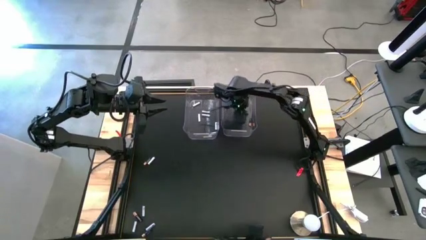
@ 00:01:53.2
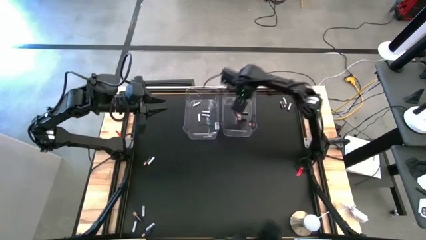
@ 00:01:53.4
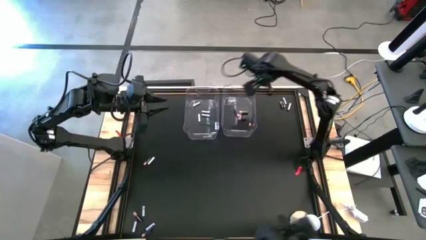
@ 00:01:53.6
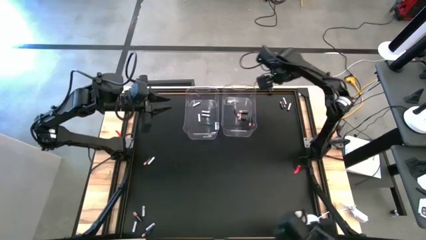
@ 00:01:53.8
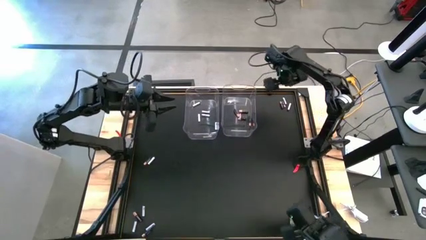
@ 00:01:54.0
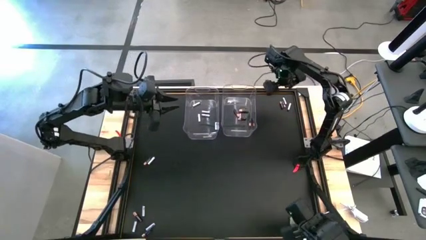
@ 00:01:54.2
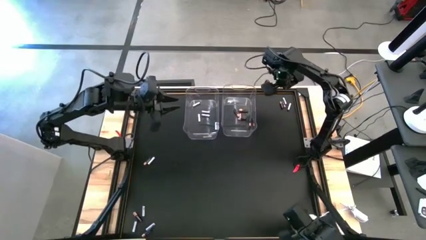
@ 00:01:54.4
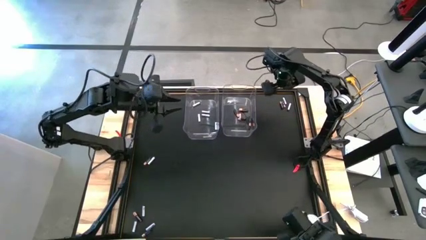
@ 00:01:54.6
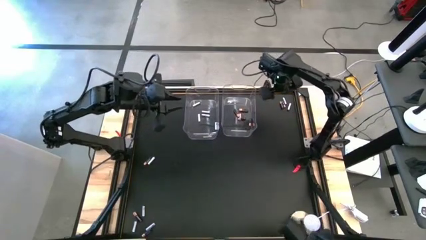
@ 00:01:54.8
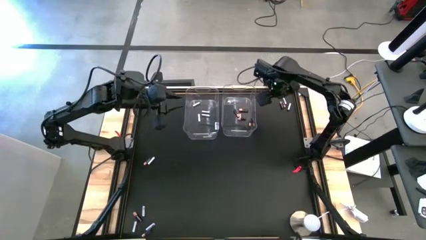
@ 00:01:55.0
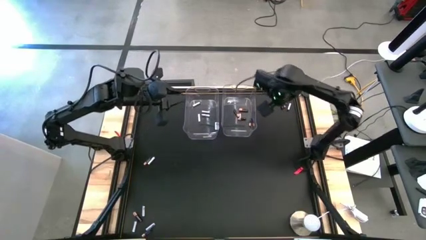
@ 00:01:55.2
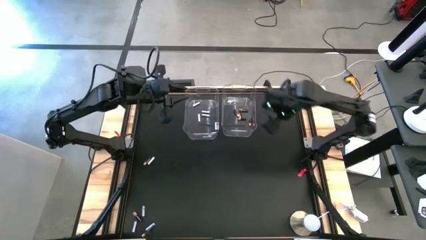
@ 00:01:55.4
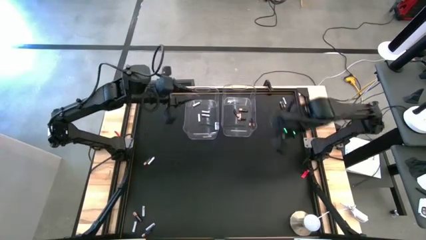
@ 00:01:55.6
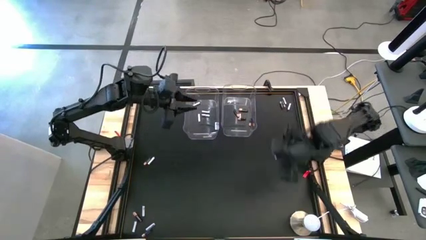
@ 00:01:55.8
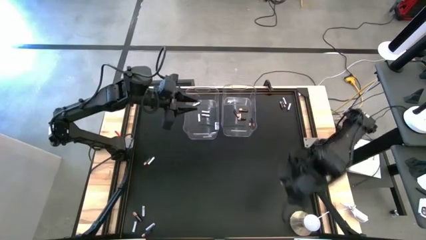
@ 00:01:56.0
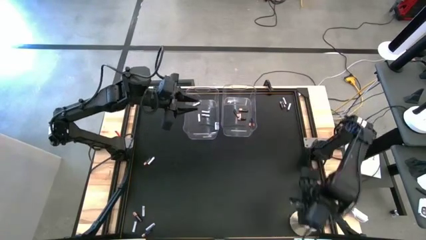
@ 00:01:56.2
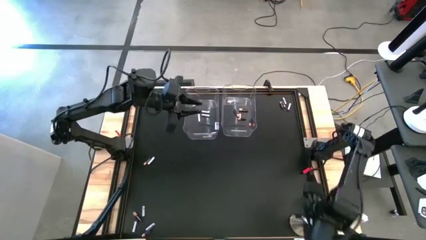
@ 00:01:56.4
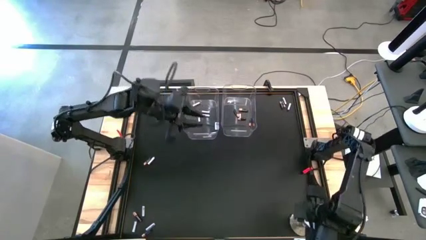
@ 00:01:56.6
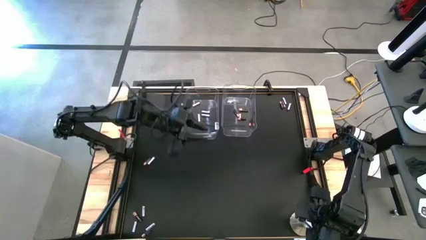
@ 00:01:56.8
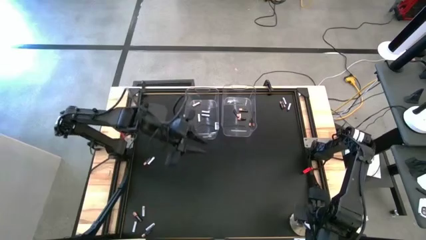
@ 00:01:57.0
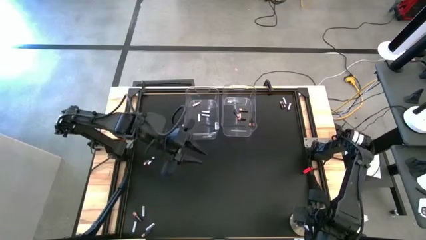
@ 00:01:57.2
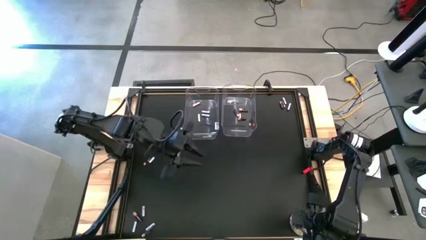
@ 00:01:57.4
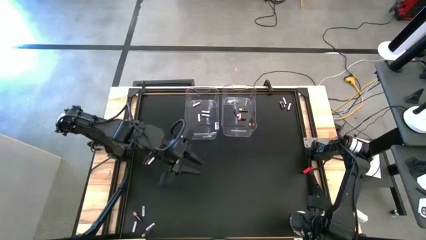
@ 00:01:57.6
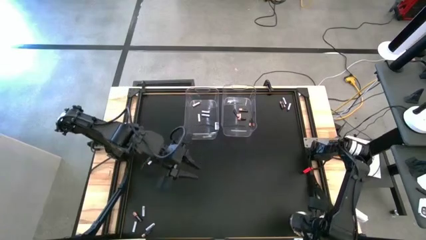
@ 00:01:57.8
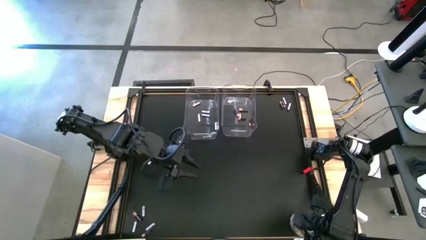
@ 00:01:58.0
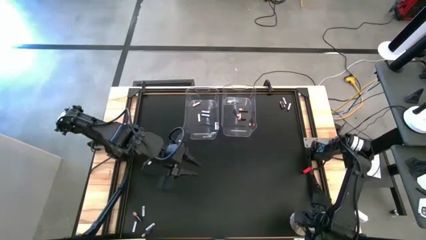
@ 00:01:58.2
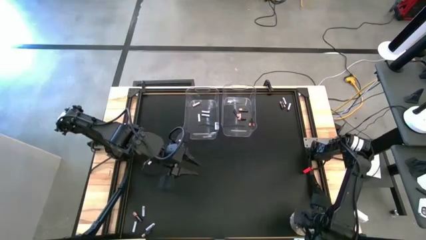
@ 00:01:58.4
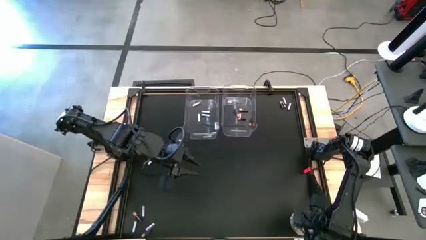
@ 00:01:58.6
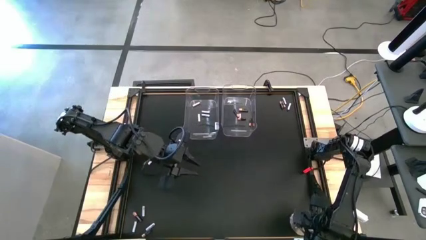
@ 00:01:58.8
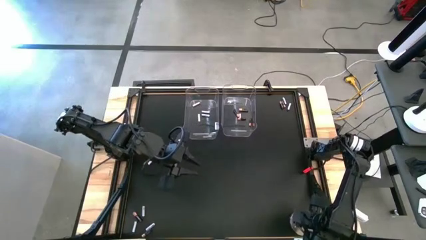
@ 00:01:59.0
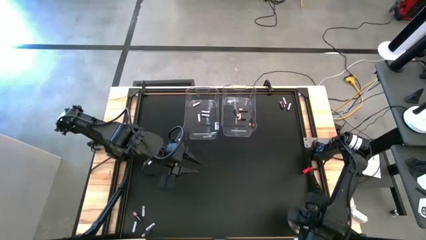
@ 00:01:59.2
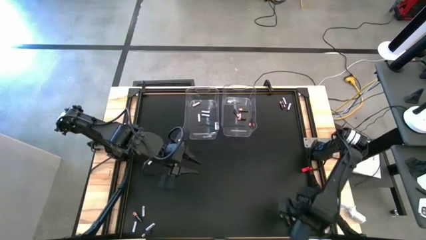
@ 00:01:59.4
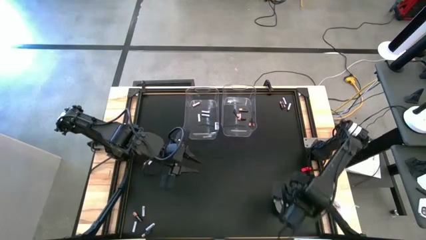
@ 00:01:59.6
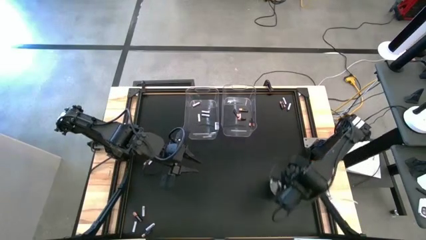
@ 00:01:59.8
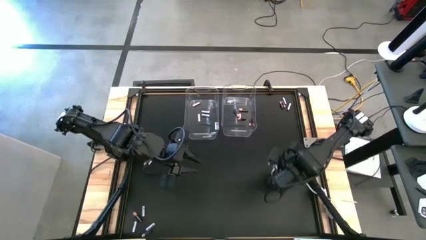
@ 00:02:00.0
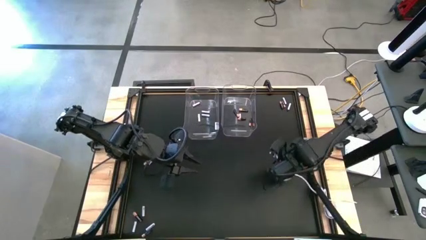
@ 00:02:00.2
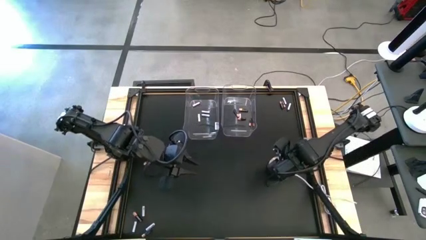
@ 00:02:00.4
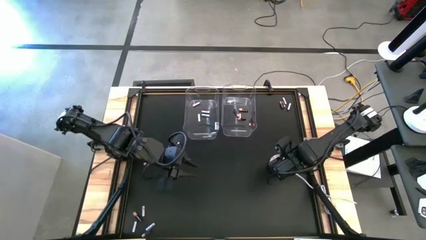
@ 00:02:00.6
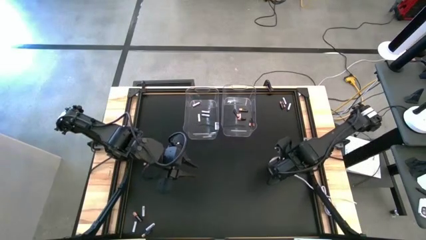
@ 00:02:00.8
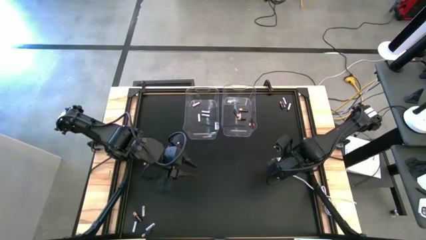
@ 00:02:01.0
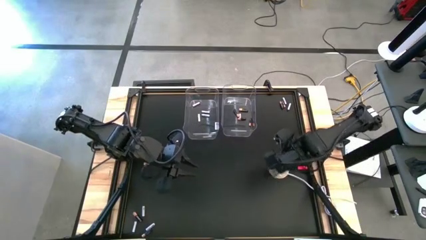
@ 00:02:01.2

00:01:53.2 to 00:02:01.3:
Task: Sort batteries
Move the lamp to the middle right of the table

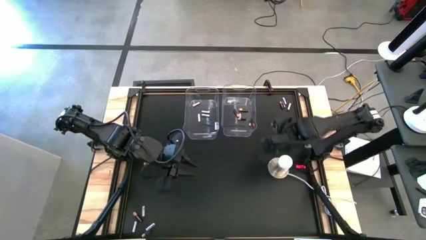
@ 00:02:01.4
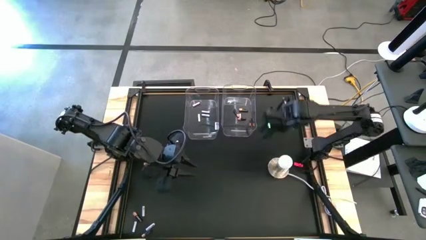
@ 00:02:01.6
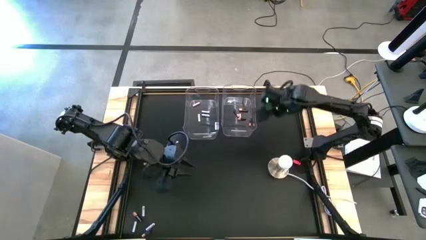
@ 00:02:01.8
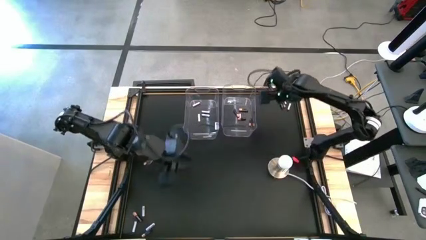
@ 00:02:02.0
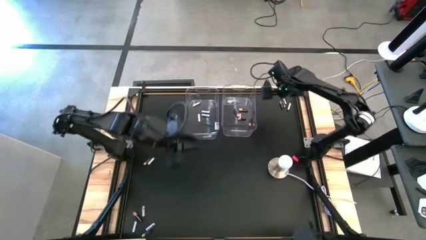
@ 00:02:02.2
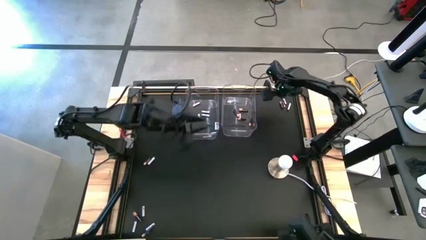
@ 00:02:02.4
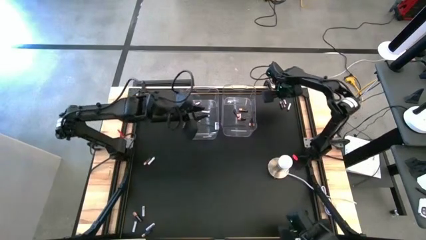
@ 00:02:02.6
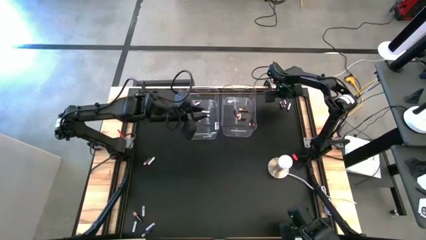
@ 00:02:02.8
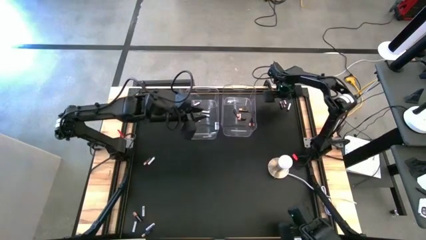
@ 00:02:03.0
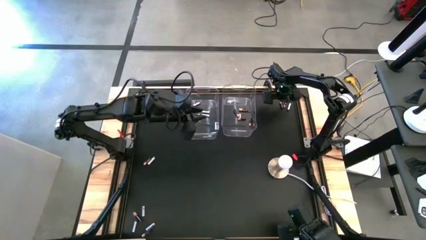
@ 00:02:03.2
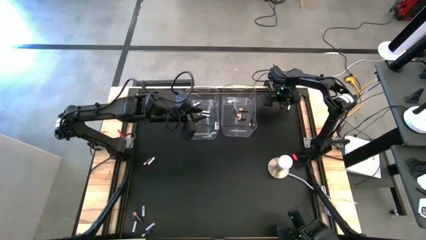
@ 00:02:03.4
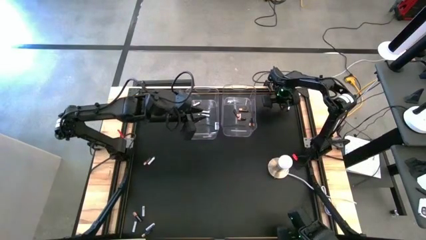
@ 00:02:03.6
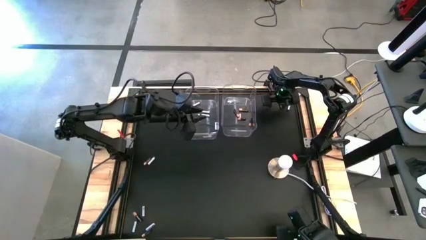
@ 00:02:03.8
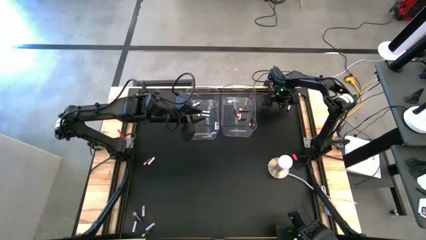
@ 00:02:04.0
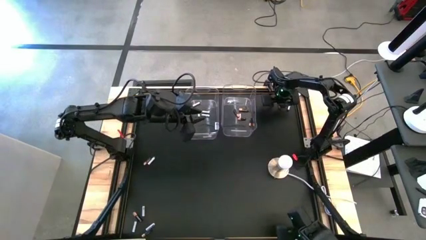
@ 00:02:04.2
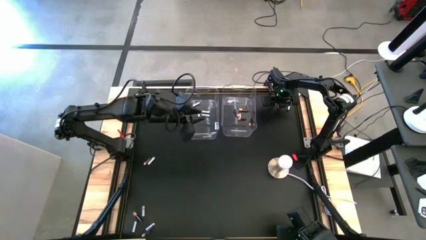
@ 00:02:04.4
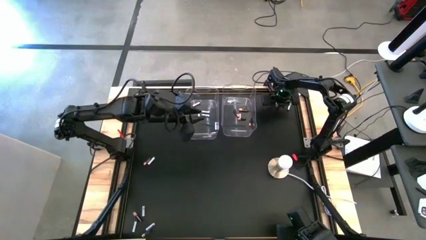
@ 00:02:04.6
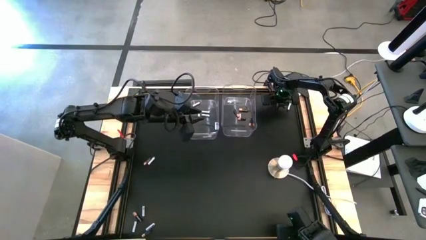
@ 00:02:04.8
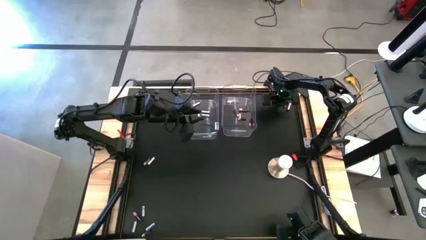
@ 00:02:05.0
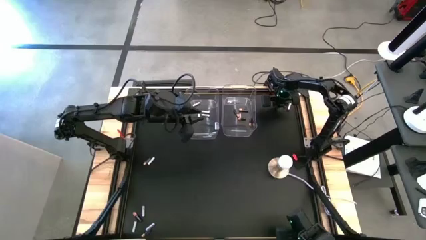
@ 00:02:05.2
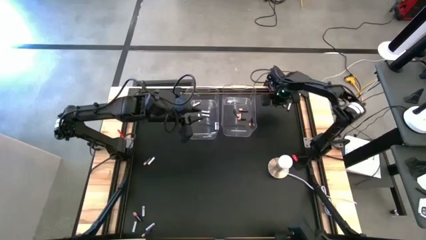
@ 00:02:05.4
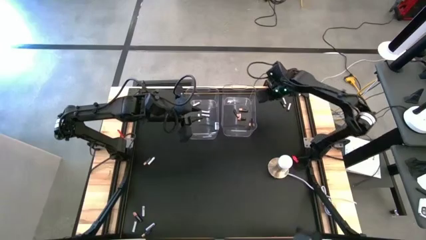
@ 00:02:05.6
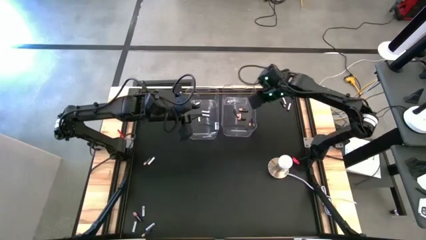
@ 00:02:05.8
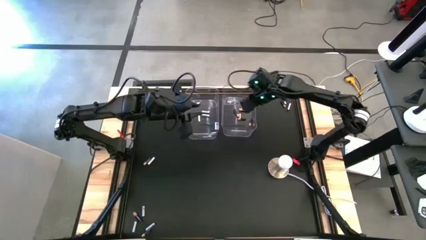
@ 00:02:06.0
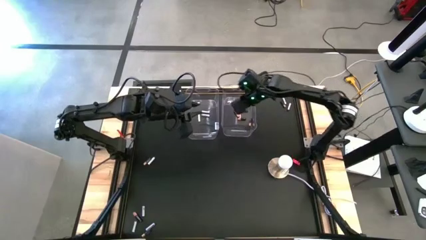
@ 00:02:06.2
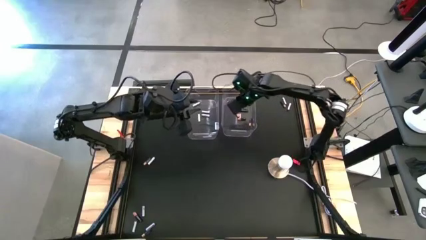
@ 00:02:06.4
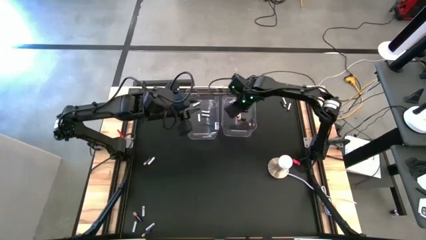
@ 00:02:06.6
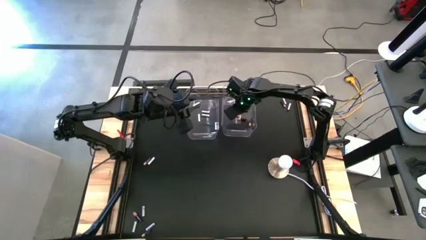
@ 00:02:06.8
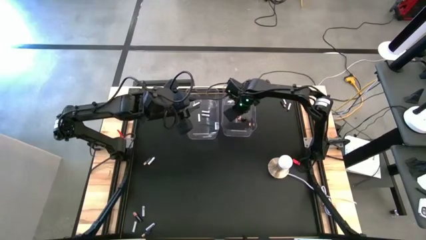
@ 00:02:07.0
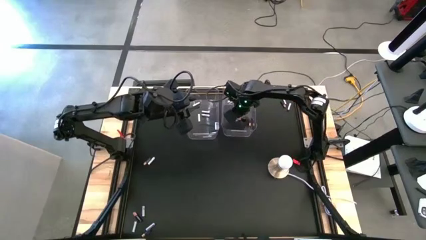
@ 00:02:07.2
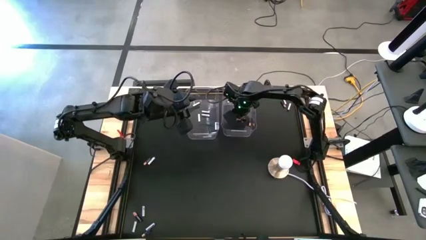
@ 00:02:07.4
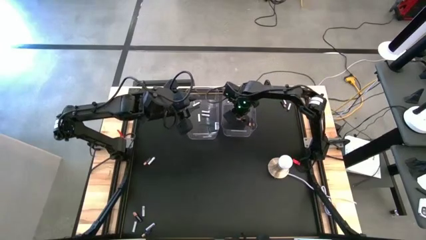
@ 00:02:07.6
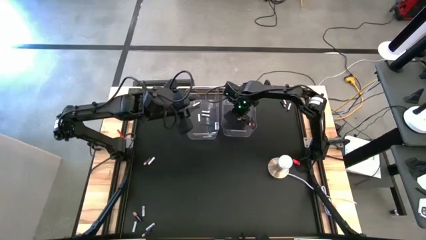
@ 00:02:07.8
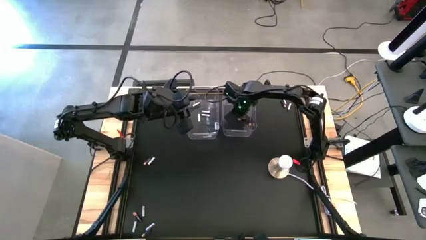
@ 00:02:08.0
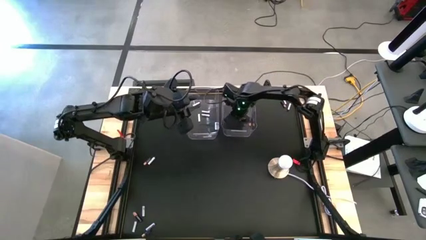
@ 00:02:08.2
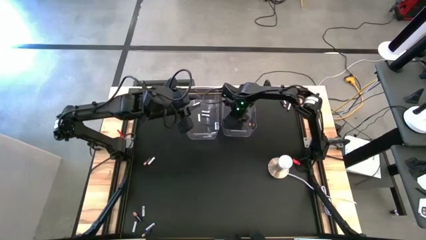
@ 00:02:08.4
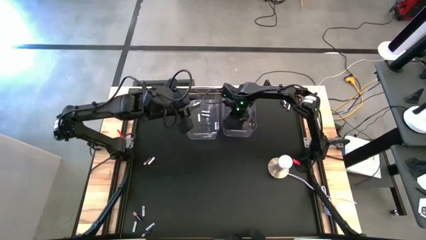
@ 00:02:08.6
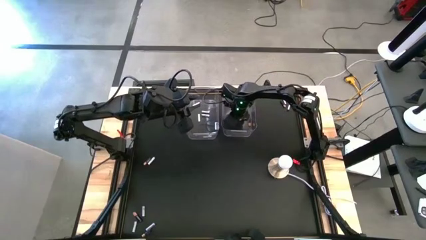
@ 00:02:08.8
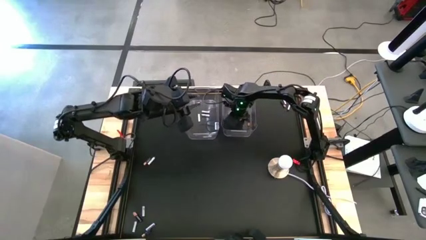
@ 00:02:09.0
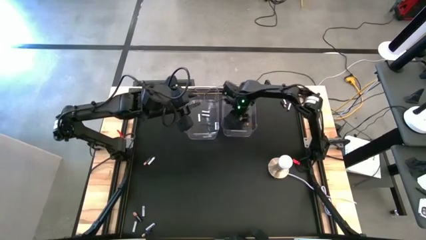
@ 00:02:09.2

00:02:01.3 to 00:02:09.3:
Put the black battery into the right transparent bin
